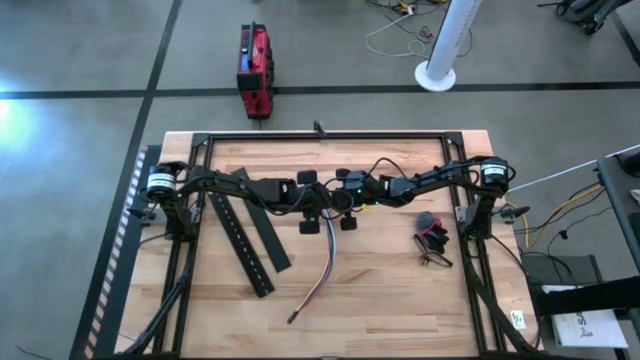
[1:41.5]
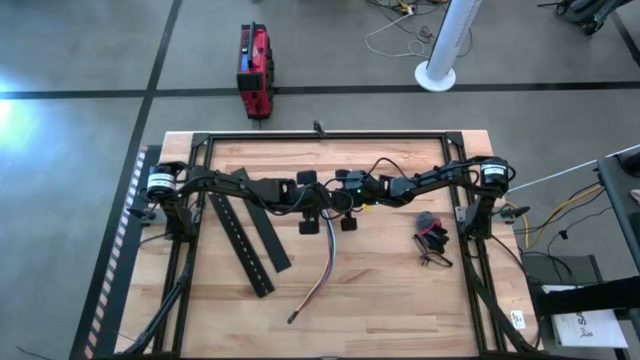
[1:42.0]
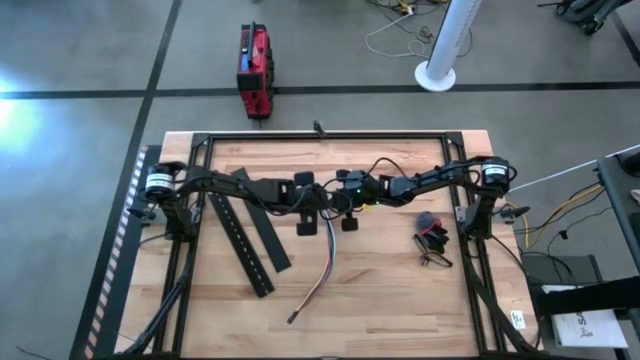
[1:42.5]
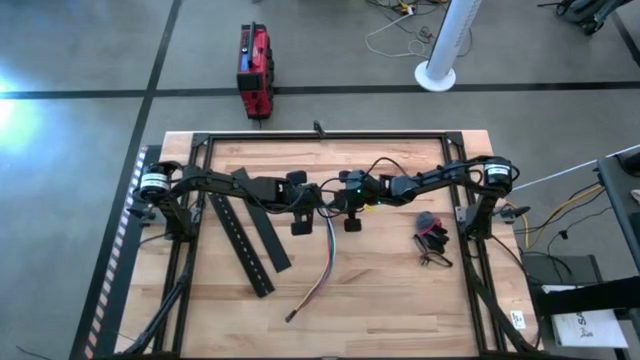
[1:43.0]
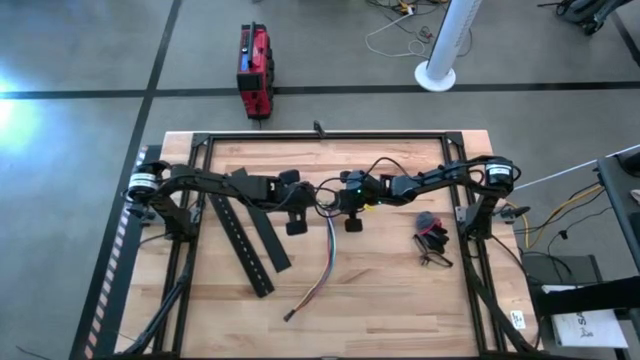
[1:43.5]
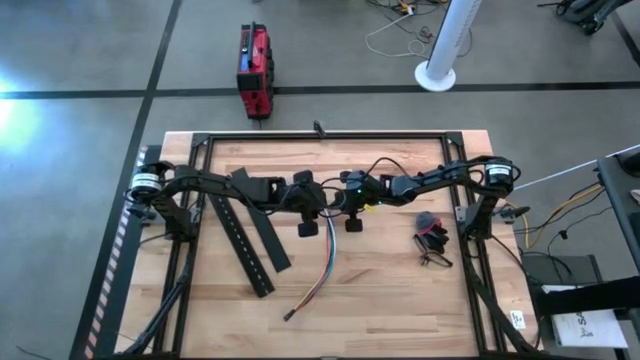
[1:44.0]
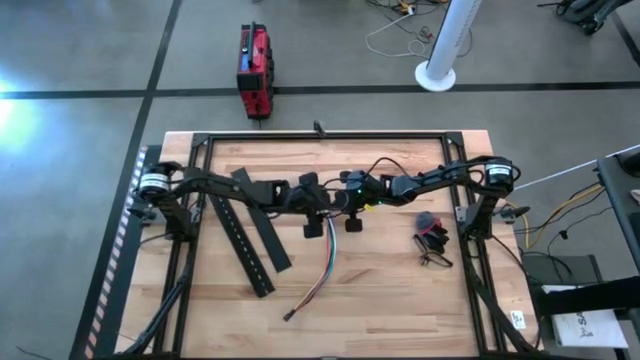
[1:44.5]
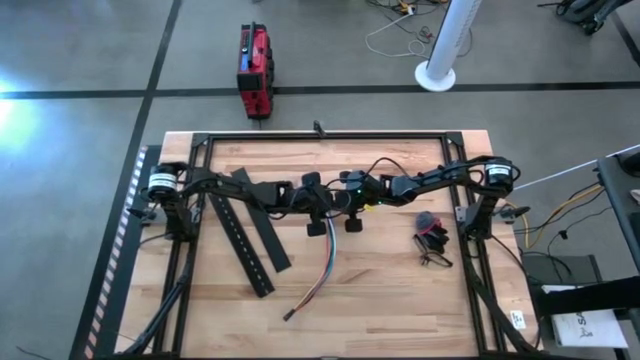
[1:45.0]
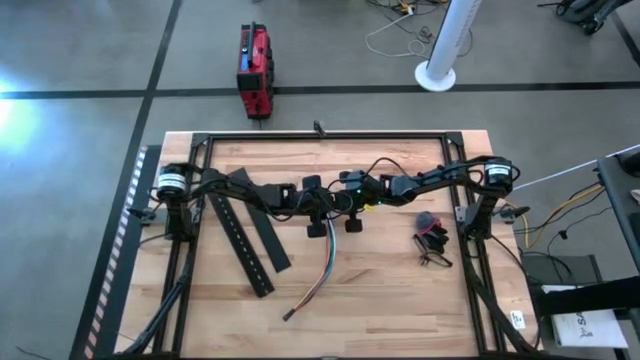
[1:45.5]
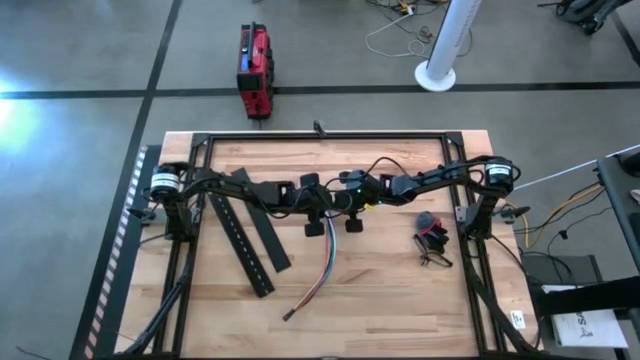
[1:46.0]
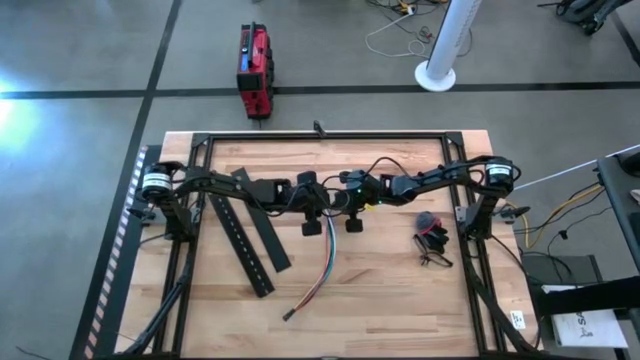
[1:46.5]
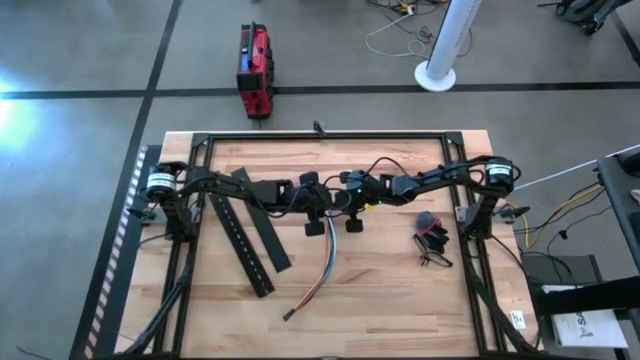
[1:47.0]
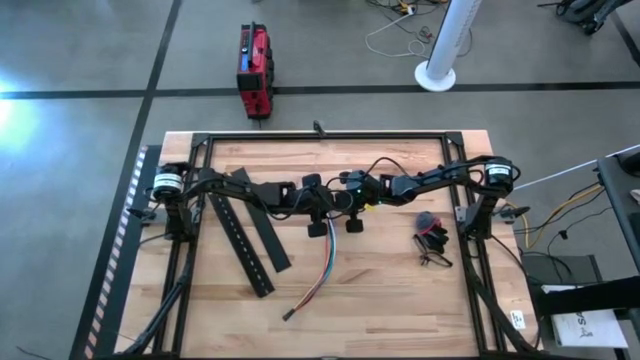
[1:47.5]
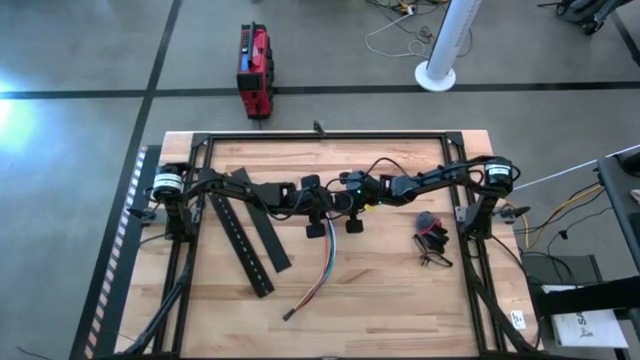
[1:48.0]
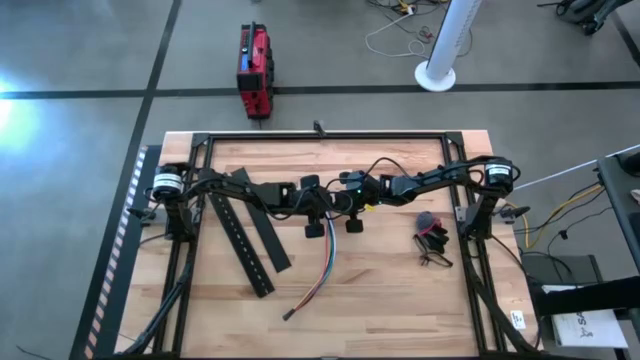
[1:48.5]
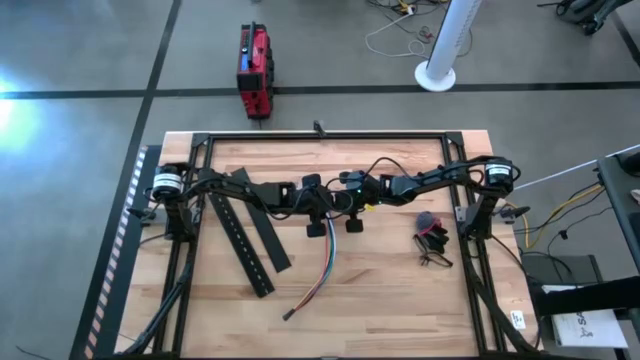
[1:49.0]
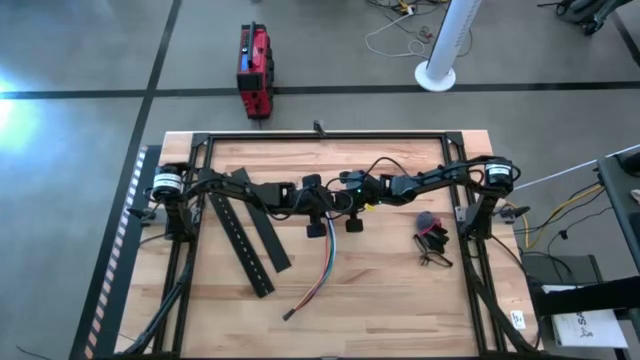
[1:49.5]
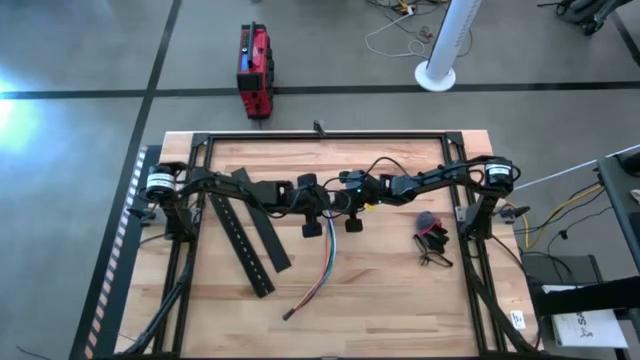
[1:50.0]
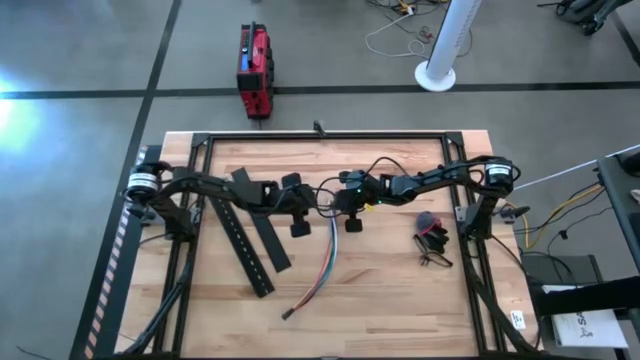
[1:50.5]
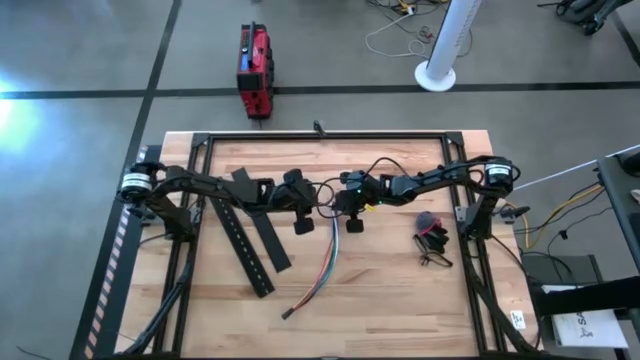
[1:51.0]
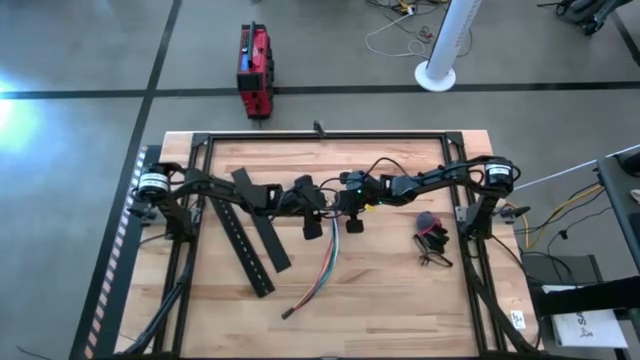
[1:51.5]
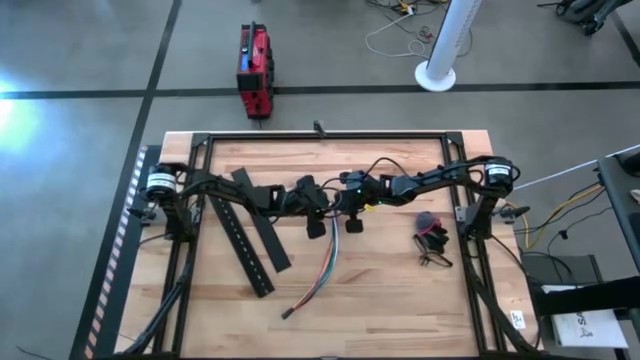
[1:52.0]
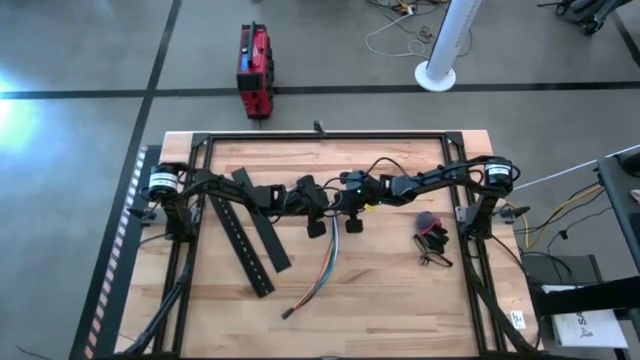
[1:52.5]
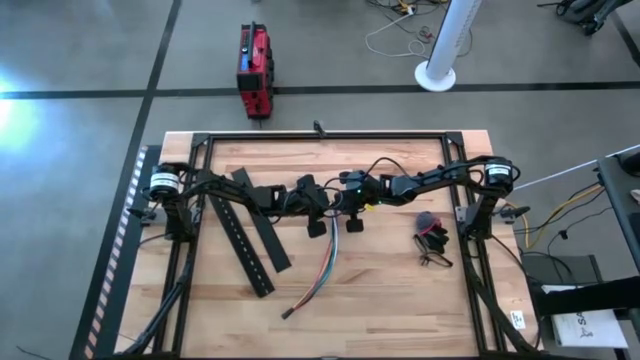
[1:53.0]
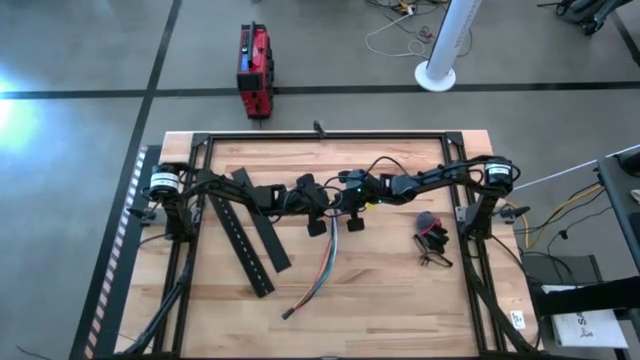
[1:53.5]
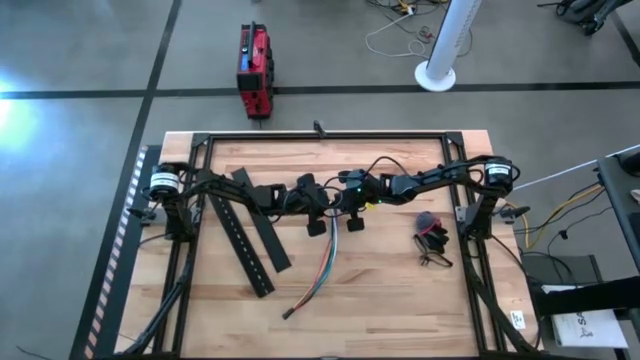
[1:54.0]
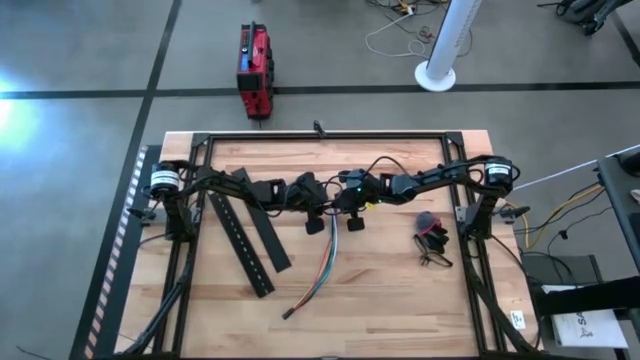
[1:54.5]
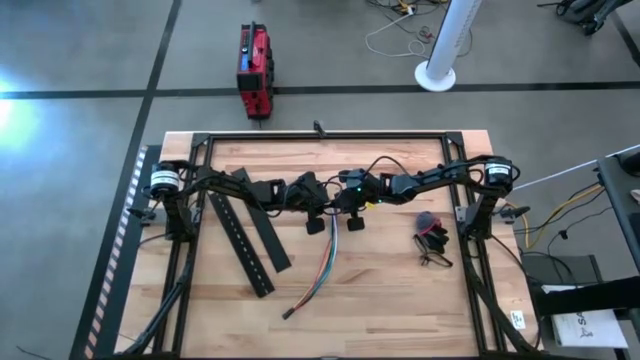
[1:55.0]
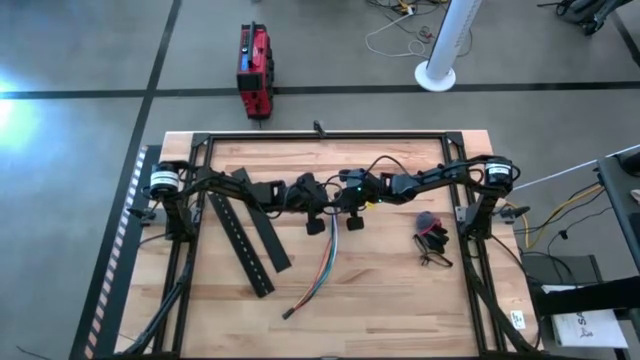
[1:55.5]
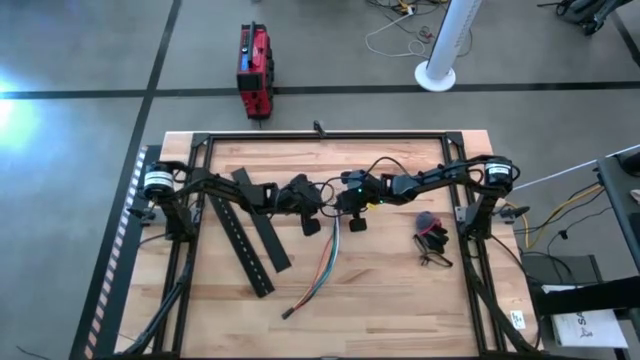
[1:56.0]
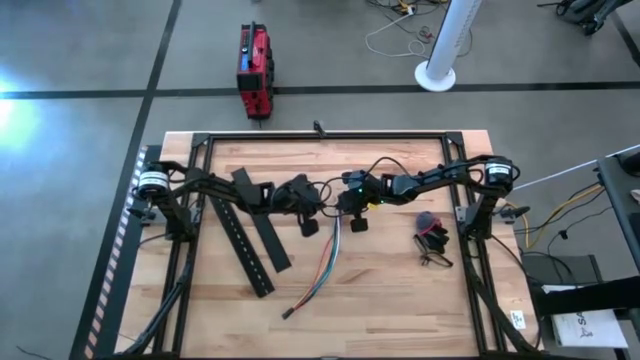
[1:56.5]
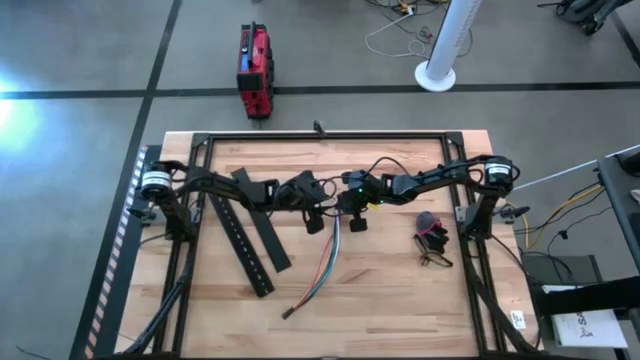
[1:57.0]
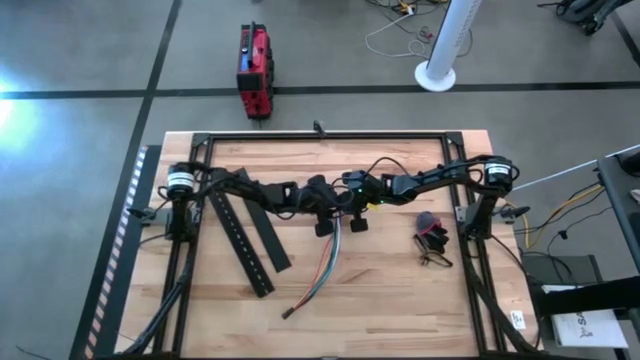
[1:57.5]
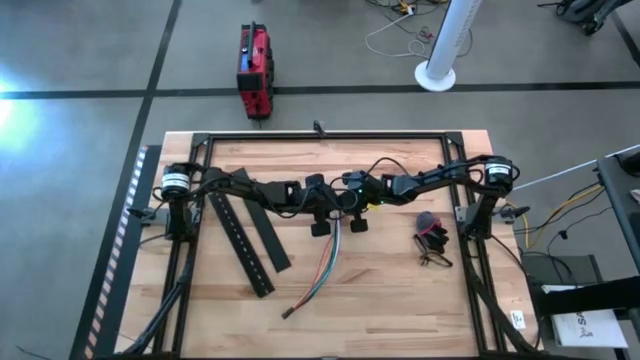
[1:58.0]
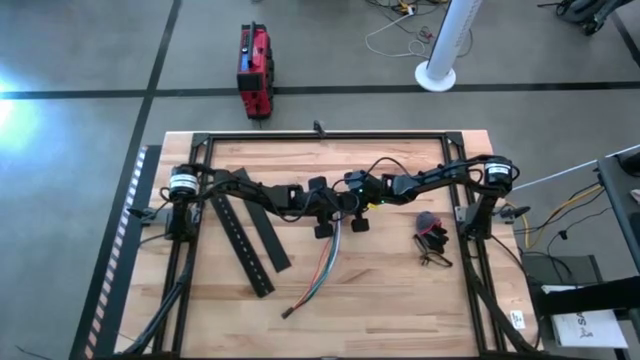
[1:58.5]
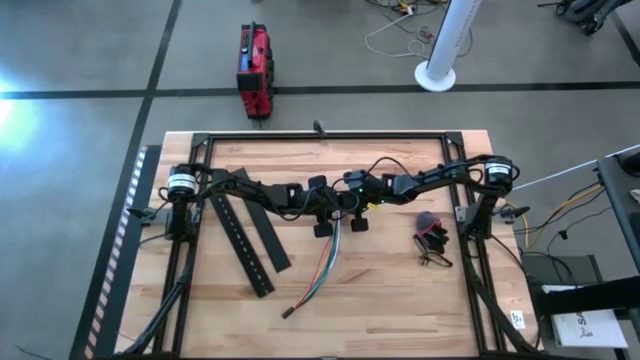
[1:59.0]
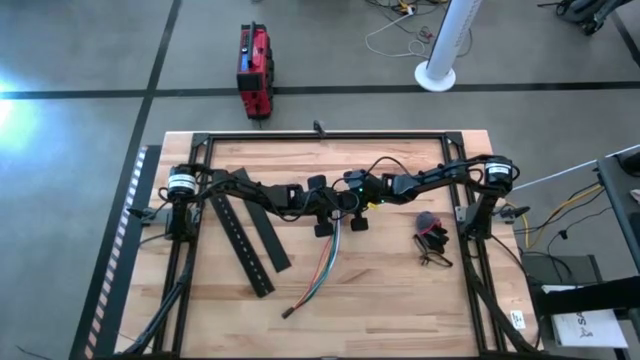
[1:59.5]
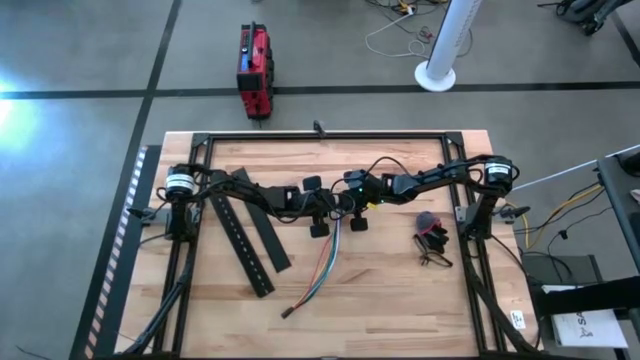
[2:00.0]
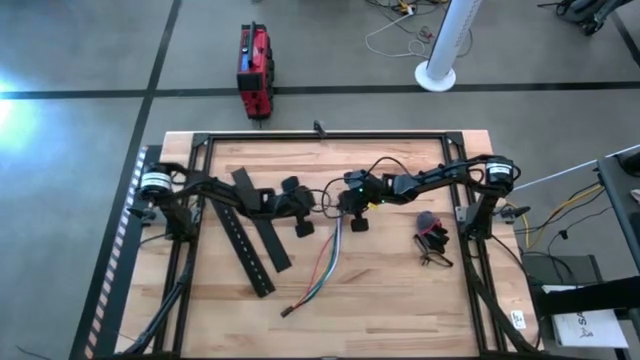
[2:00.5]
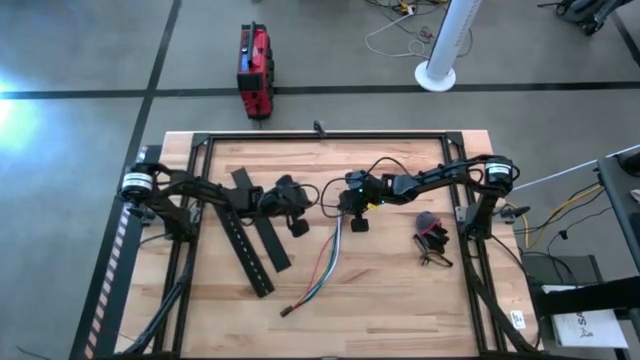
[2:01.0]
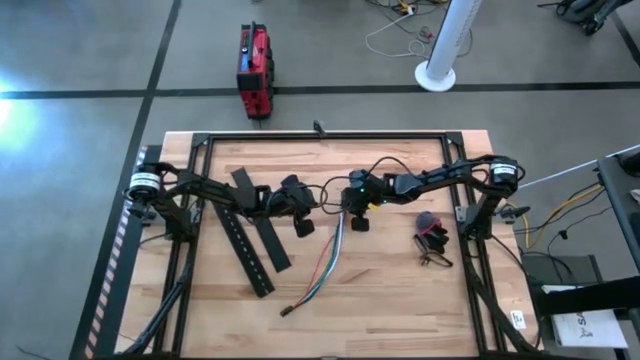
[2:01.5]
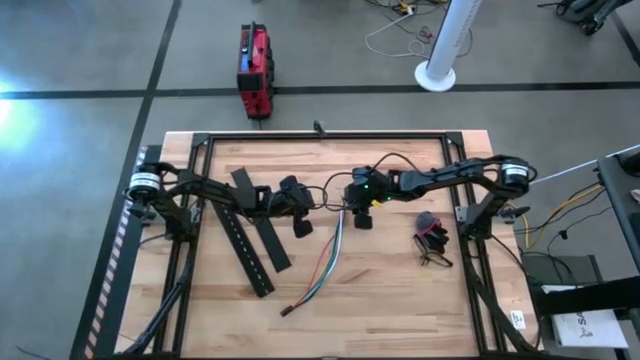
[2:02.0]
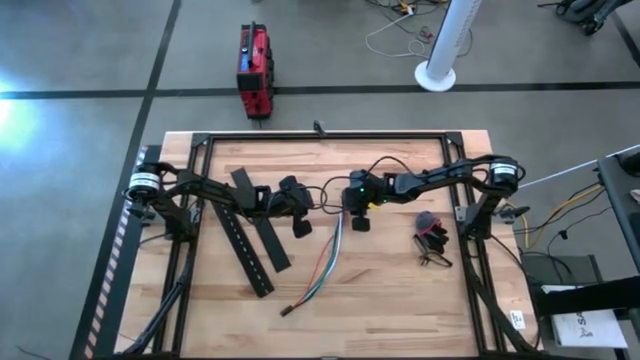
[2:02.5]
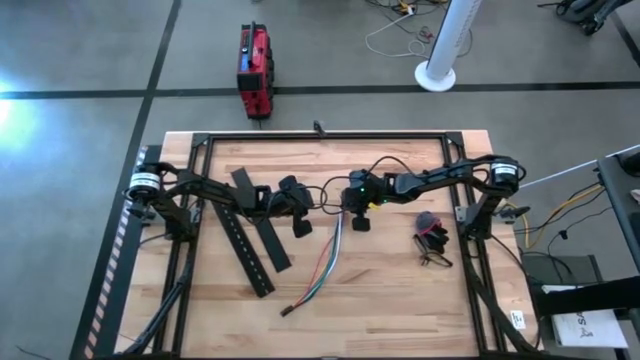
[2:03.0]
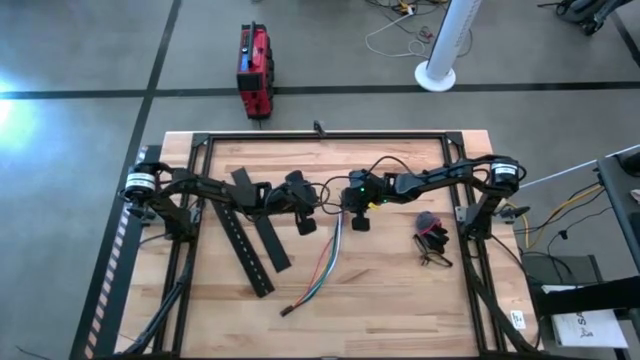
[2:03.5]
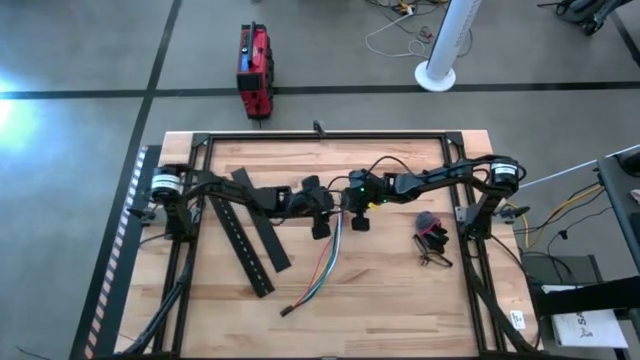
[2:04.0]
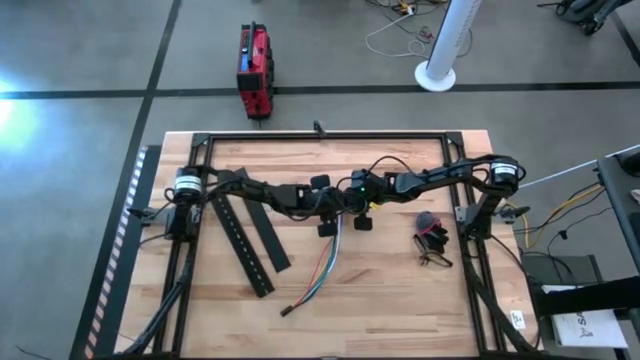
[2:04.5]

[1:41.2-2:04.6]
Task: Ziptie cables
Wrap the cable wires with the black zip tie
